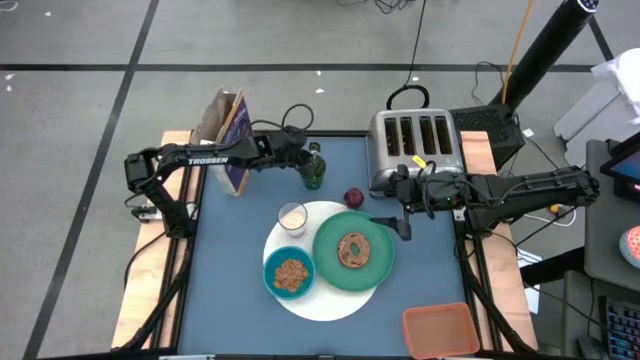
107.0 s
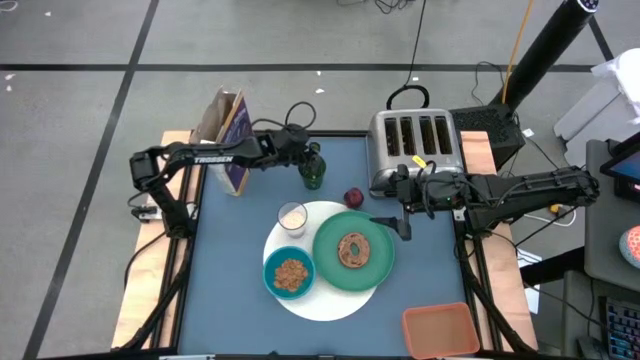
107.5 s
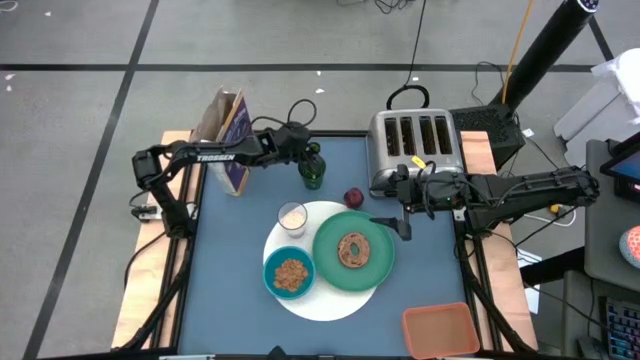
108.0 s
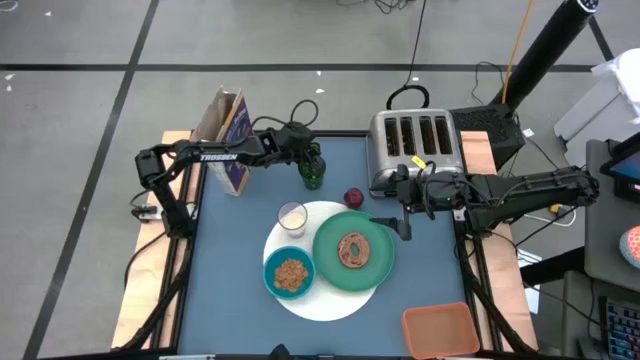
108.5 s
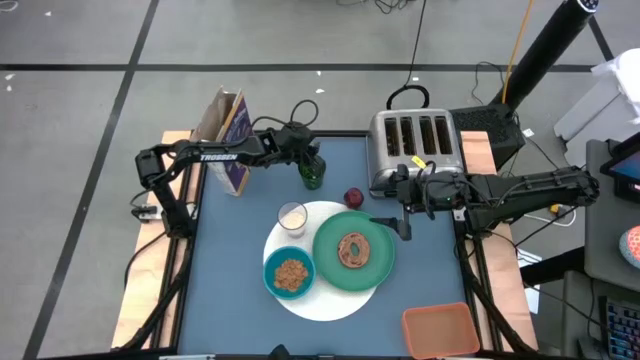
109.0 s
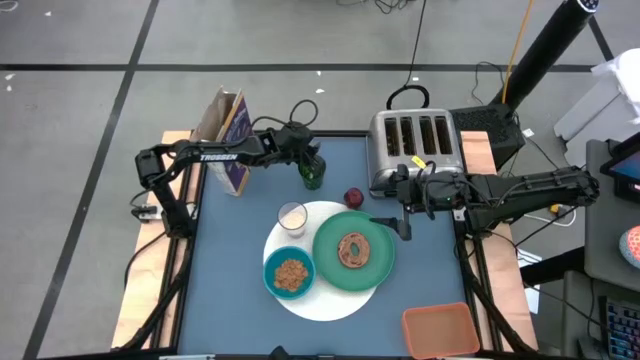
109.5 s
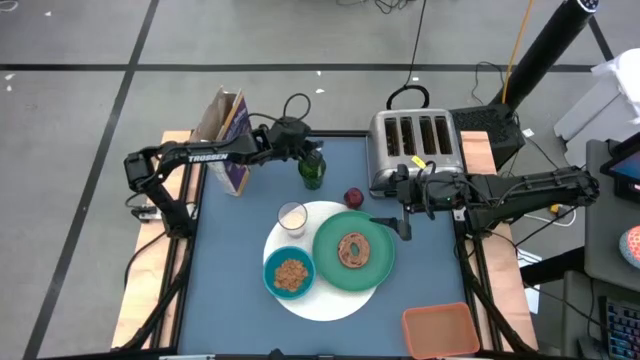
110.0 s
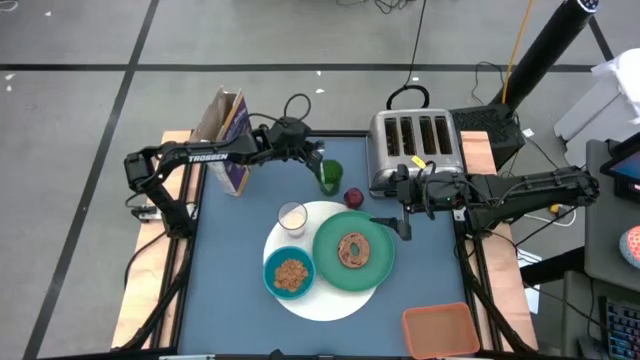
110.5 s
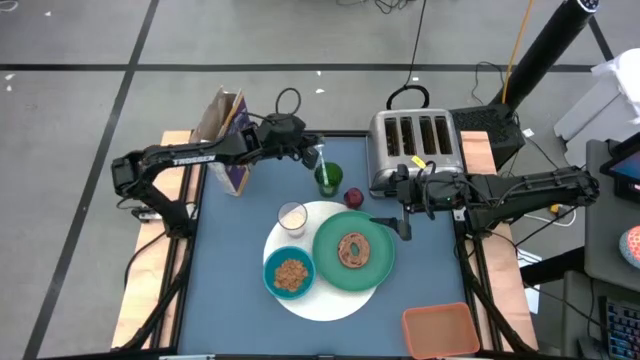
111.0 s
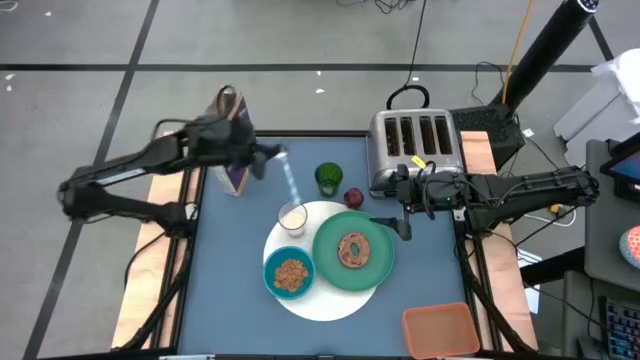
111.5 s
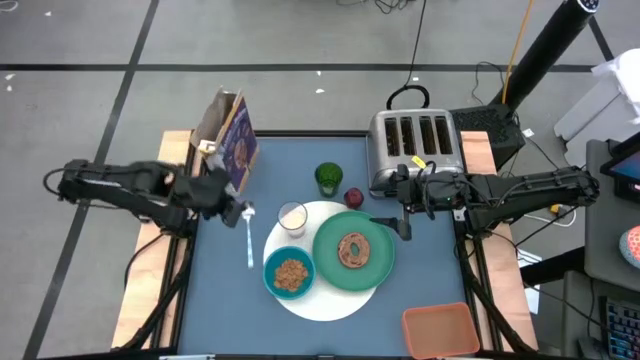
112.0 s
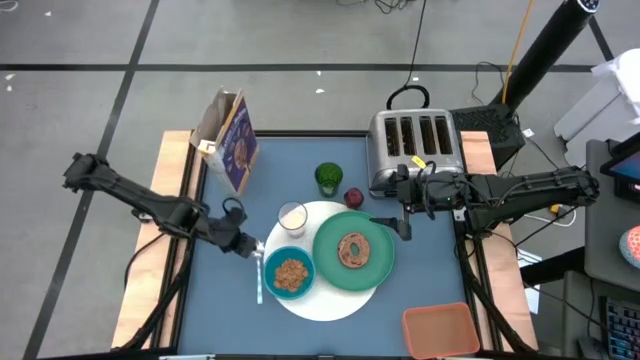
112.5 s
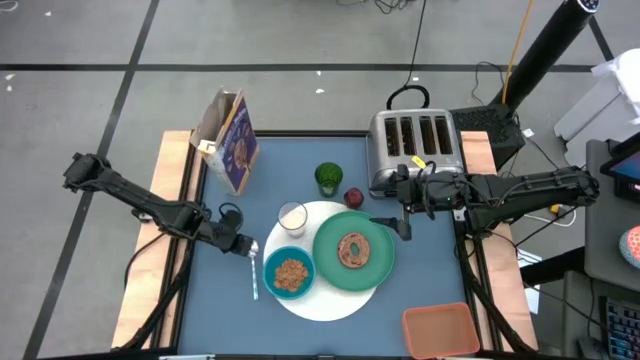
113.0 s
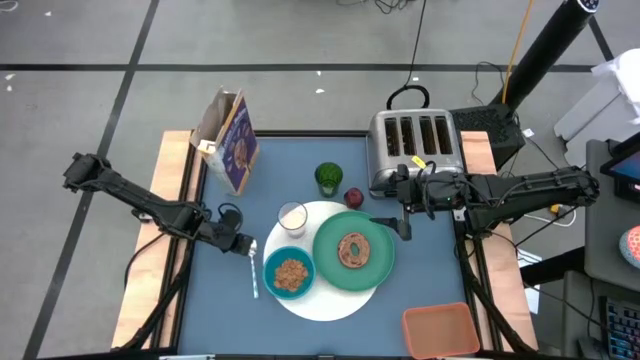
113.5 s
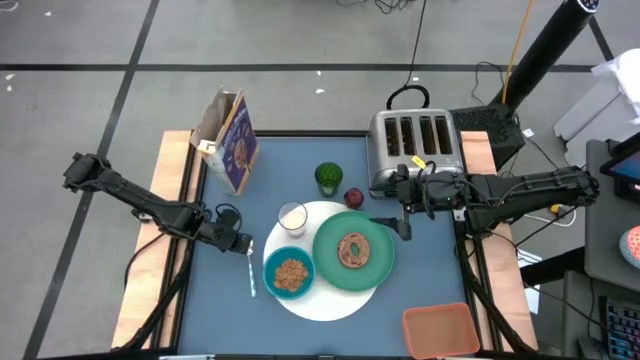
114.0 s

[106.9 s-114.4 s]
Task: Arrange a breakfast setting
Put the green spoon into the blue table mat

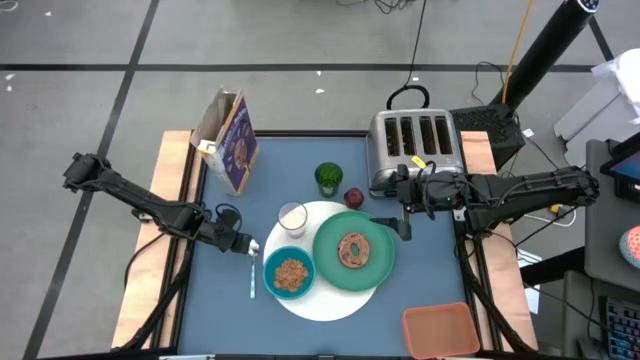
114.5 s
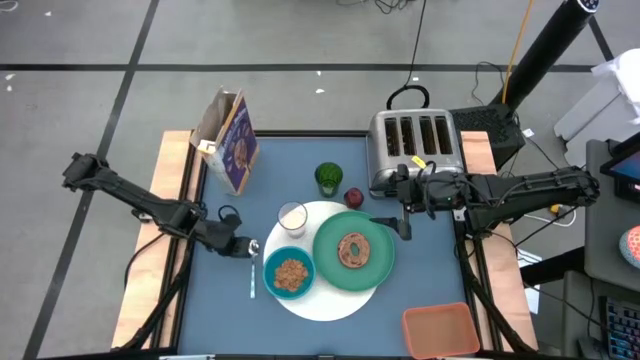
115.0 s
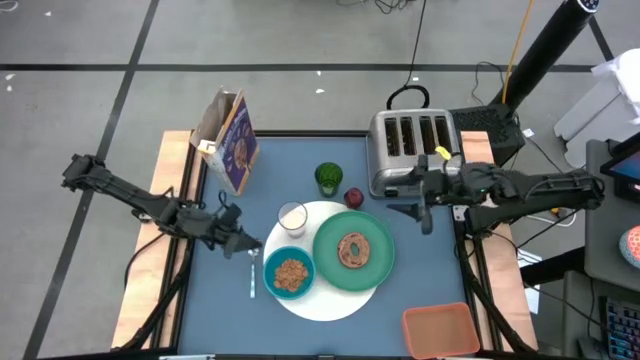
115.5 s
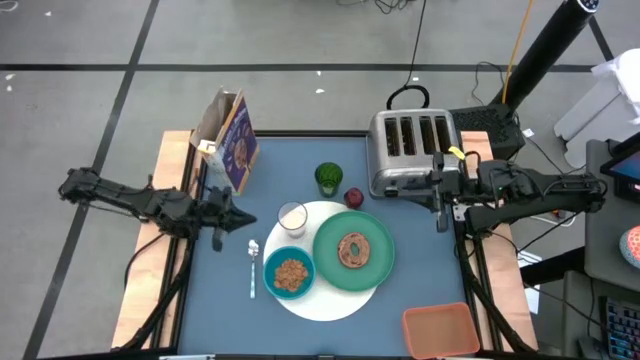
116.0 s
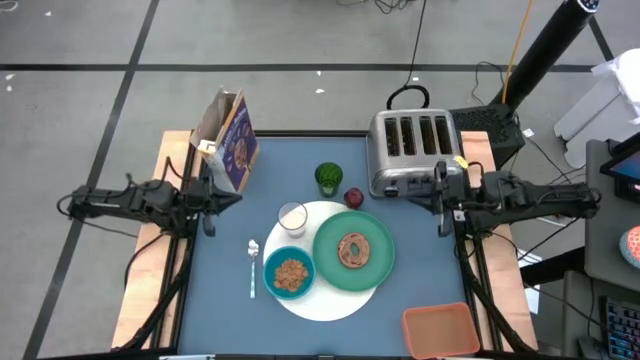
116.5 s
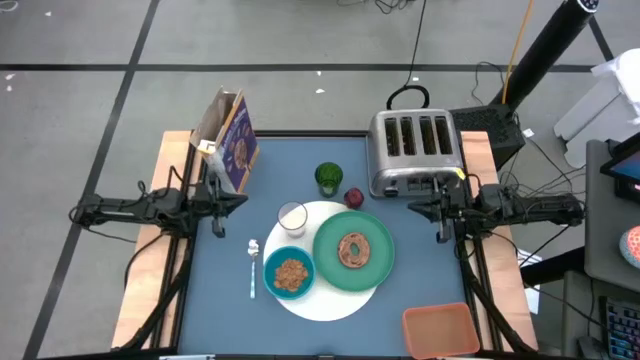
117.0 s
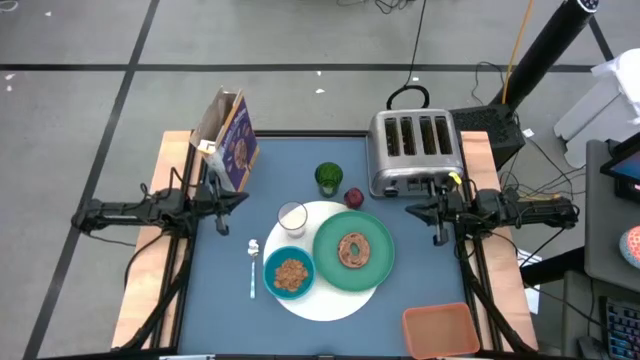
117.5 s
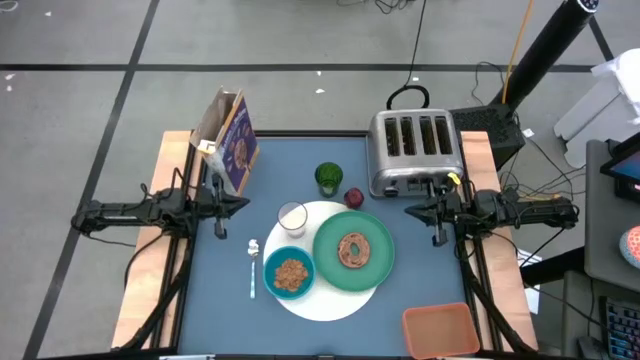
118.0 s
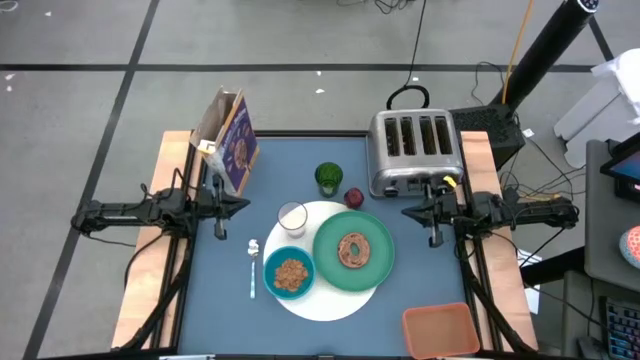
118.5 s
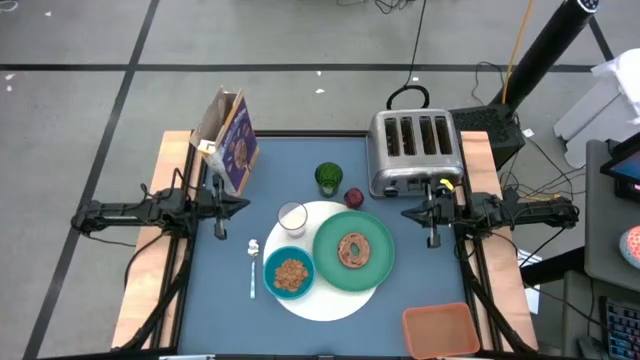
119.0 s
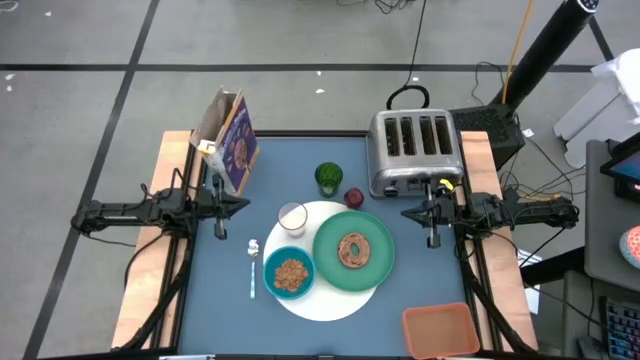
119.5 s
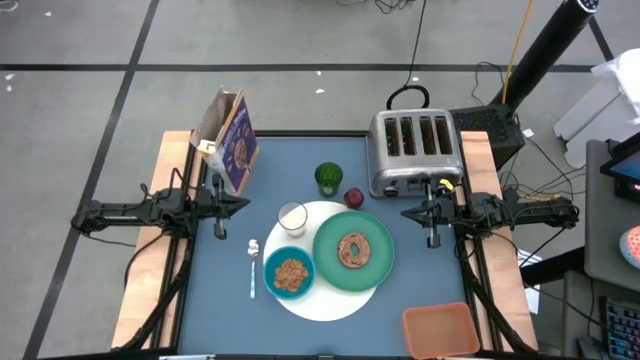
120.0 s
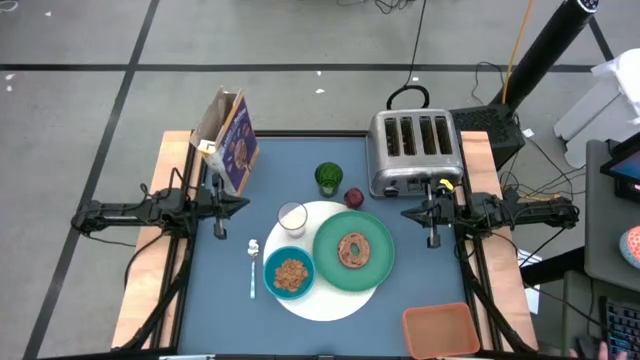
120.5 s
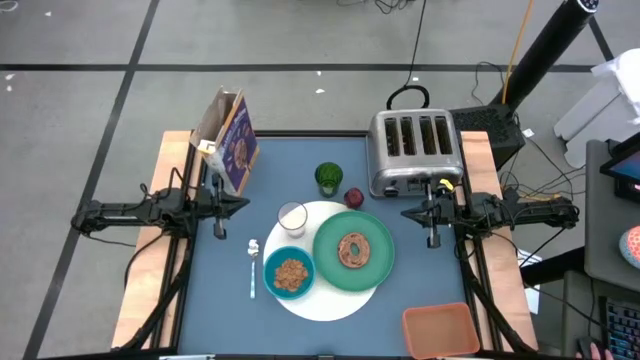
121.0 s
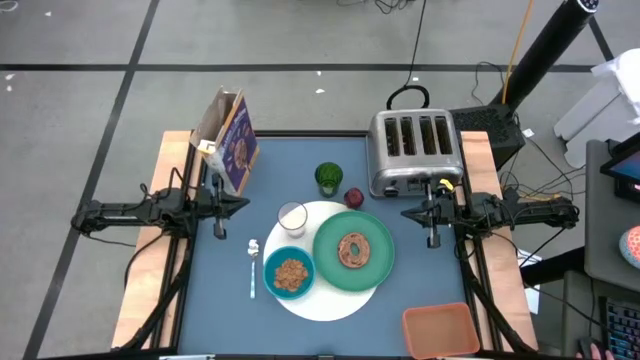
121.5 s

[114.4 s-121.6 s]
Return to home position

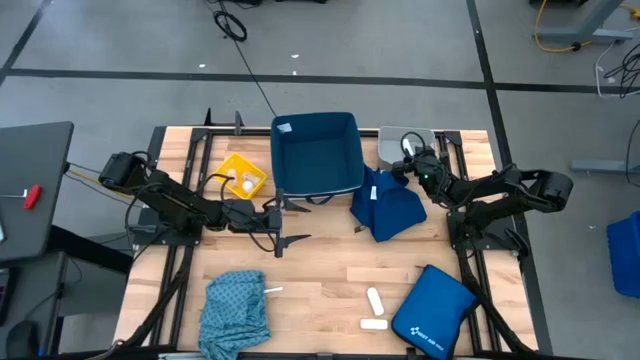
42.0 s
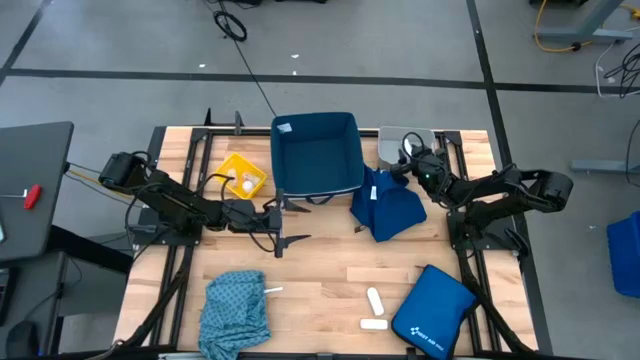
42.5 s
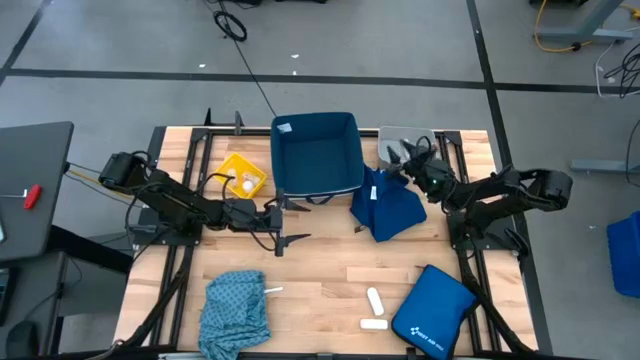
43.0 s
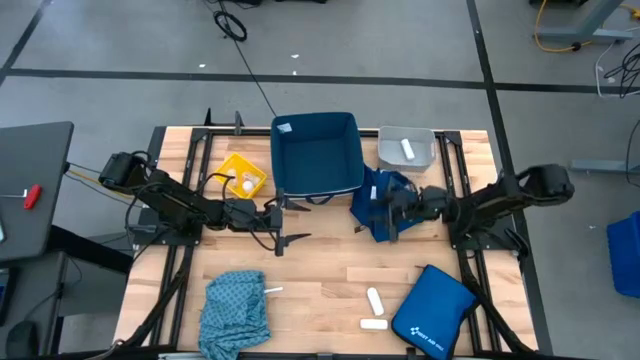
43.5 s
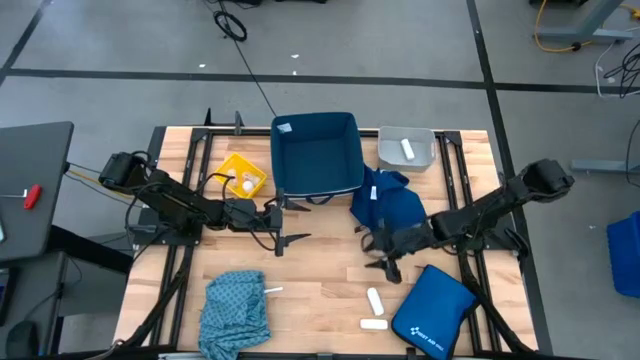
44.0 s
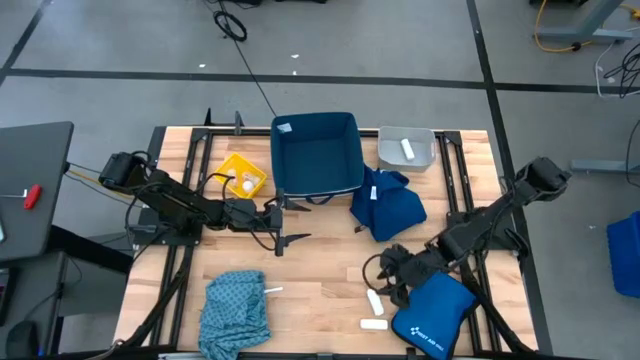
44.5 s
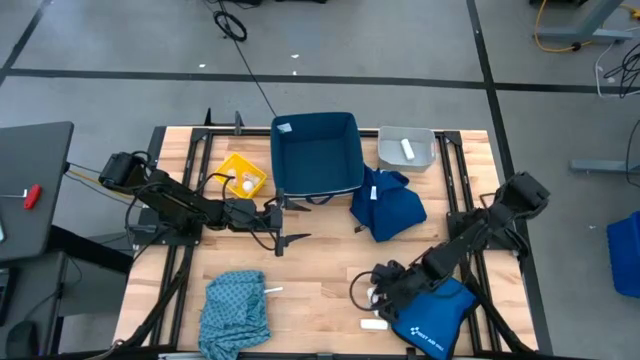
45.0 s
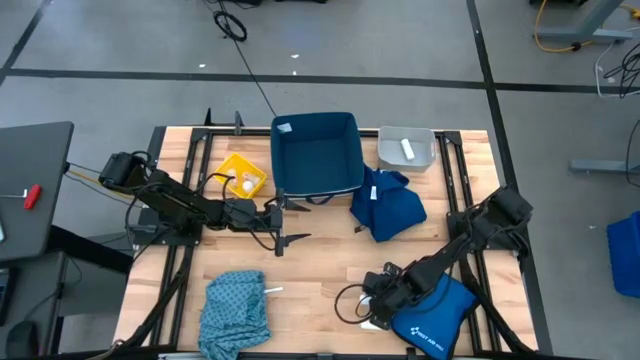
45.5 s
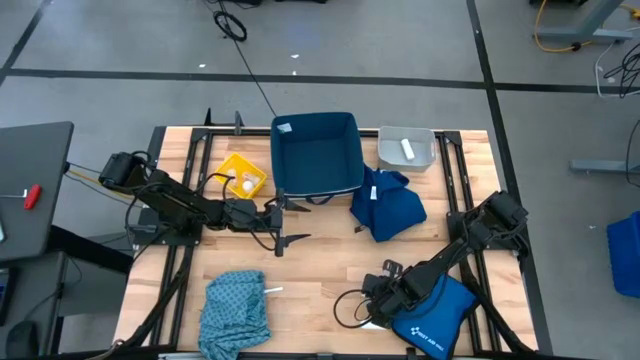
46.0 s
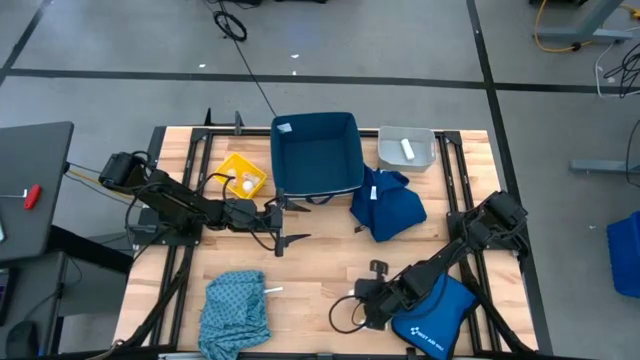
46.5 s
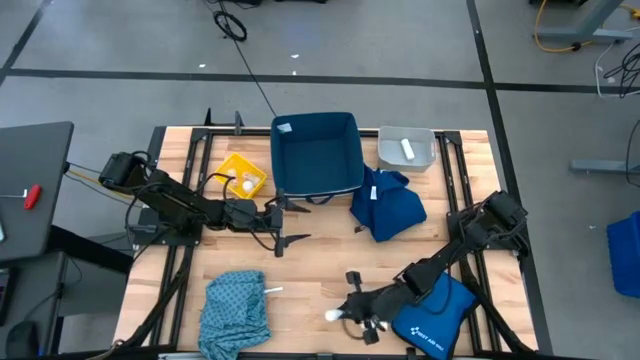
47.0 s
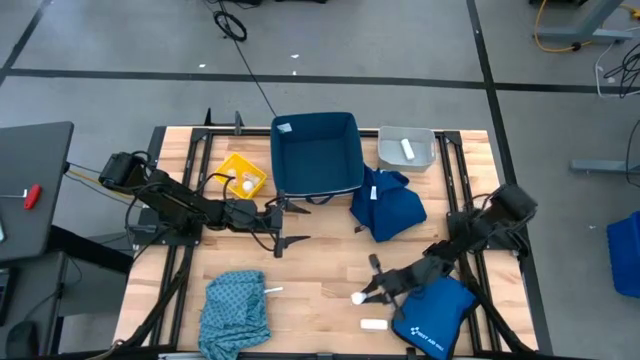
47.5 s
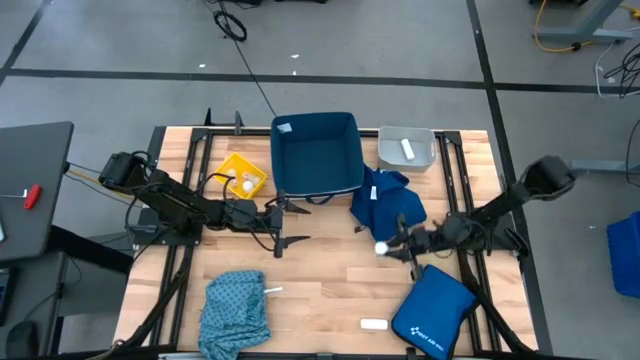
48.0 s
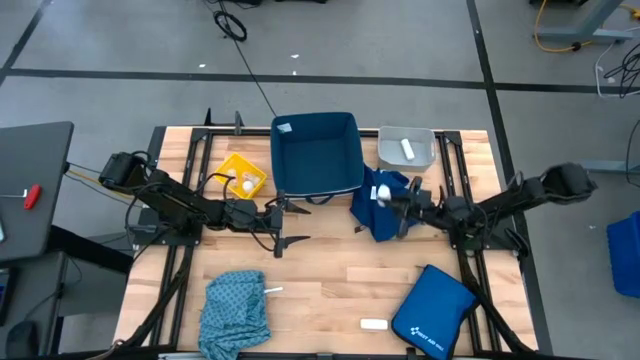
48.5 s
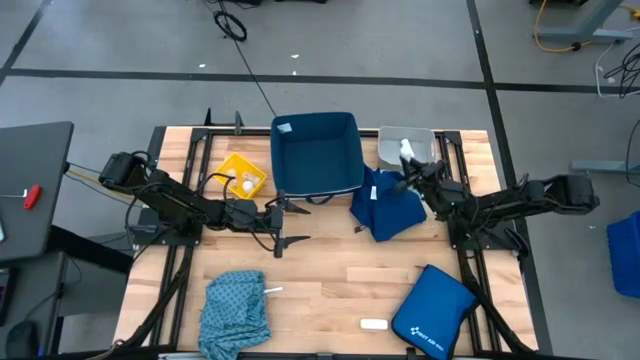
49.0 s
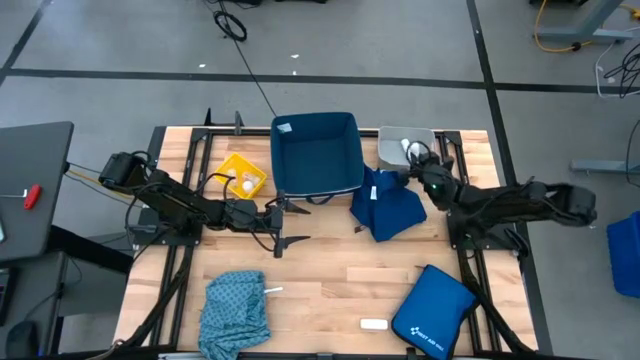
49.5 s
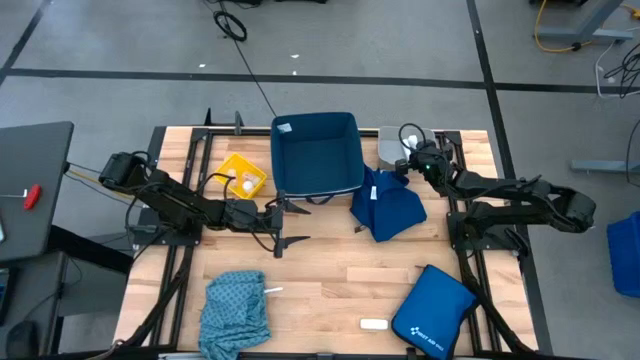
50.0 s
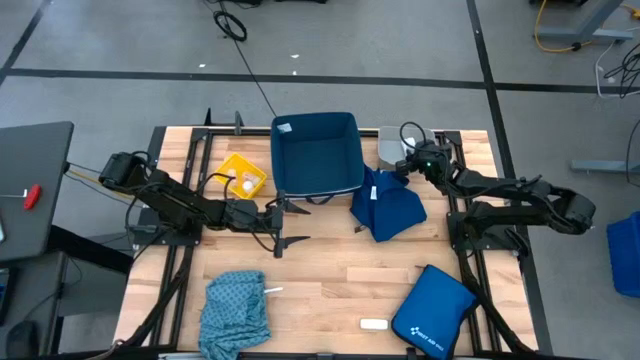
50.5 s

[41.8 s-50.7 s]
Task: Pick & place medical supplies in basket/bin
Put the top white bandage into the grey bin
